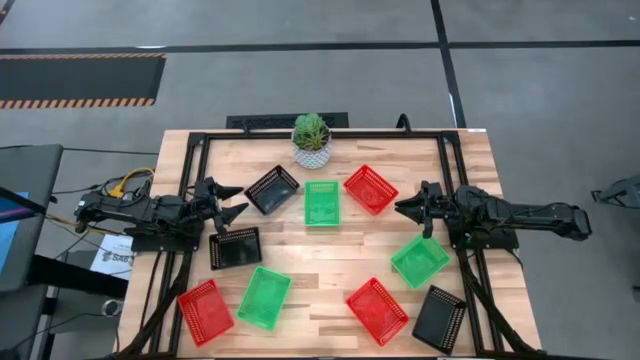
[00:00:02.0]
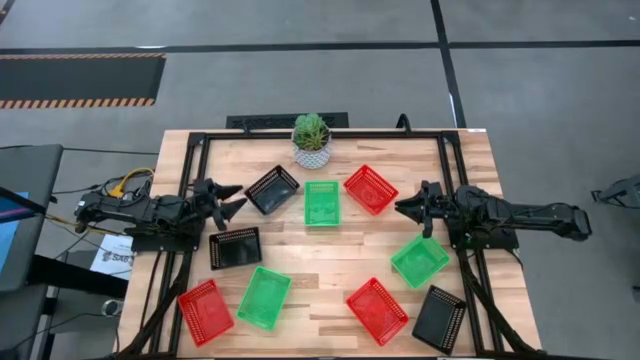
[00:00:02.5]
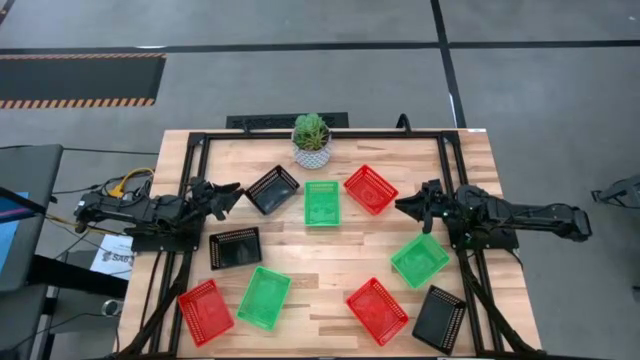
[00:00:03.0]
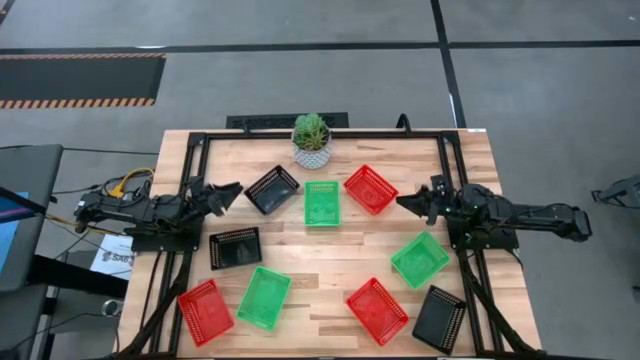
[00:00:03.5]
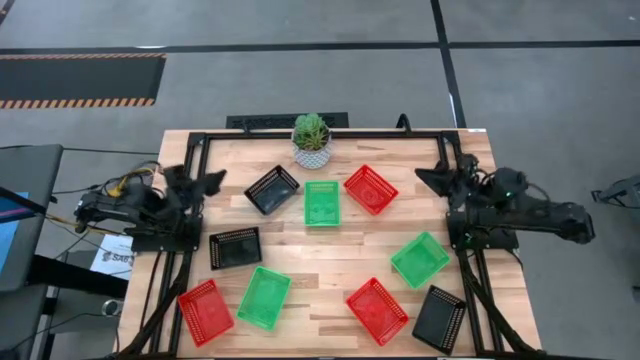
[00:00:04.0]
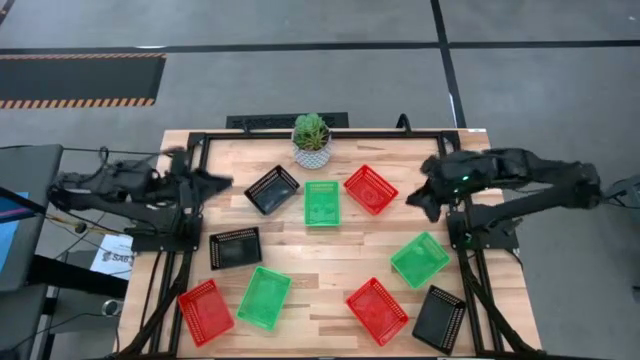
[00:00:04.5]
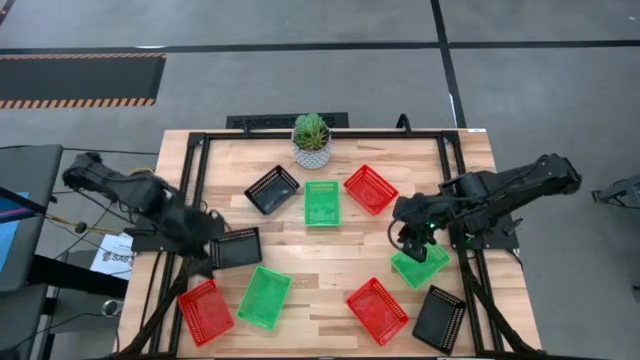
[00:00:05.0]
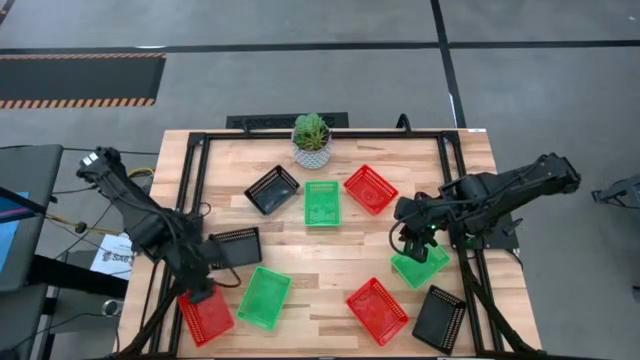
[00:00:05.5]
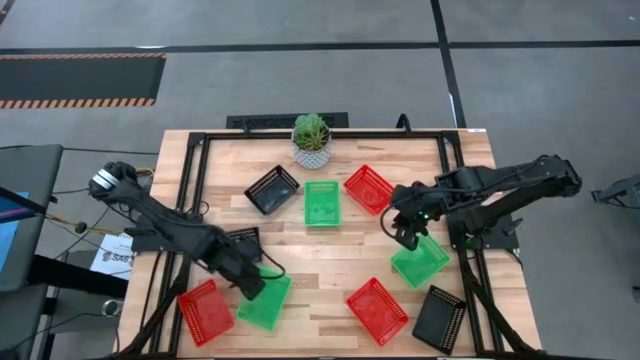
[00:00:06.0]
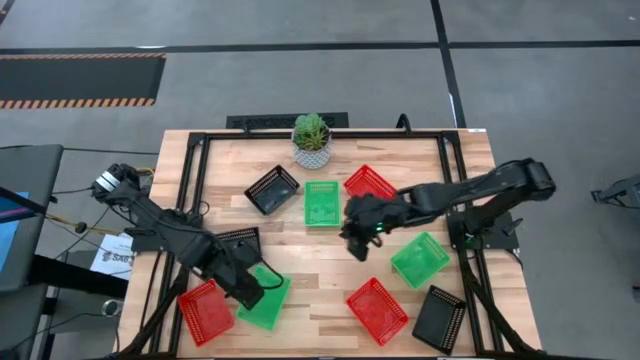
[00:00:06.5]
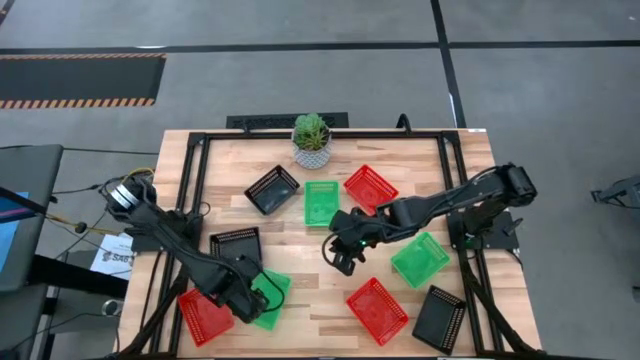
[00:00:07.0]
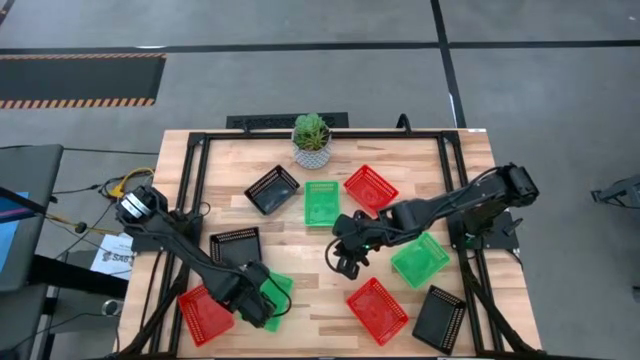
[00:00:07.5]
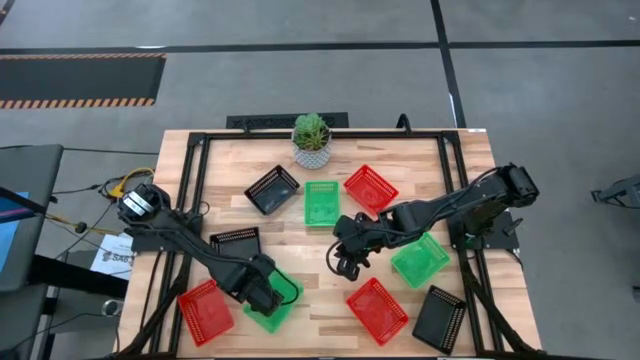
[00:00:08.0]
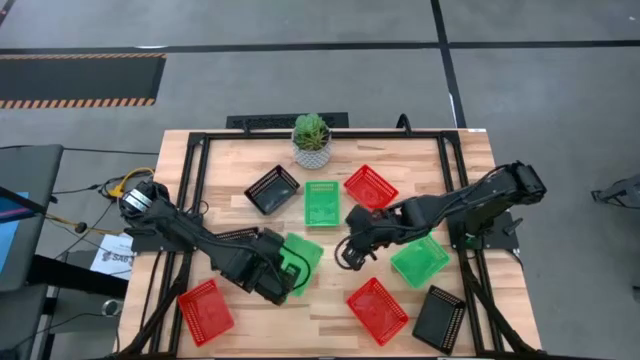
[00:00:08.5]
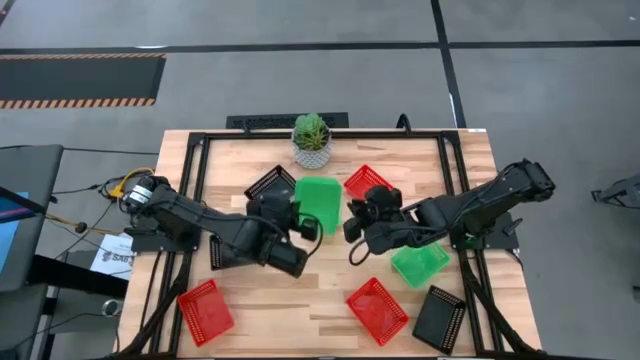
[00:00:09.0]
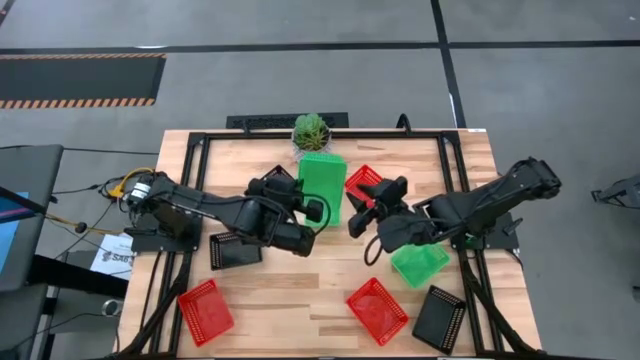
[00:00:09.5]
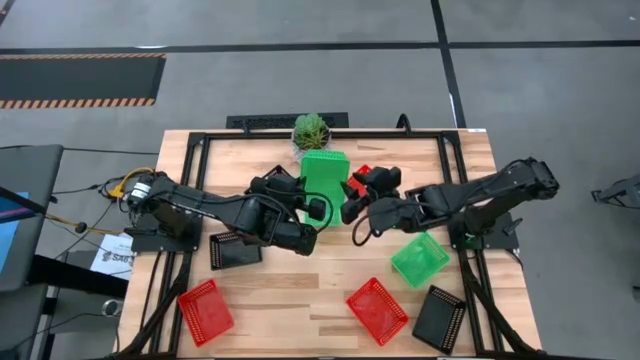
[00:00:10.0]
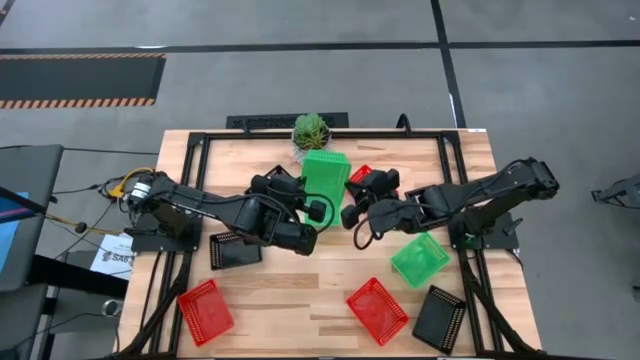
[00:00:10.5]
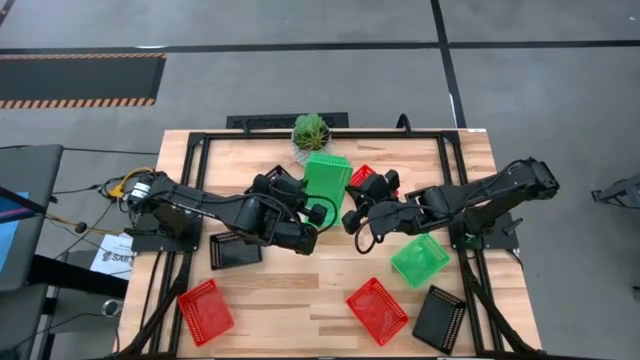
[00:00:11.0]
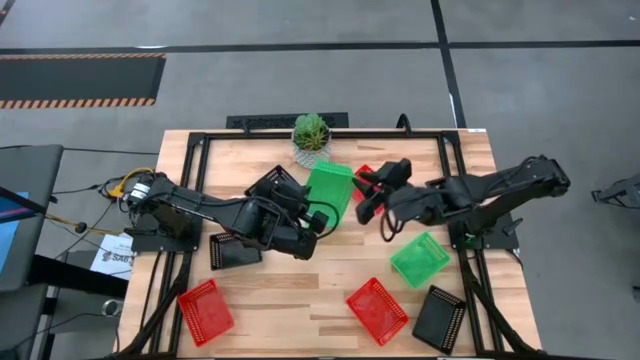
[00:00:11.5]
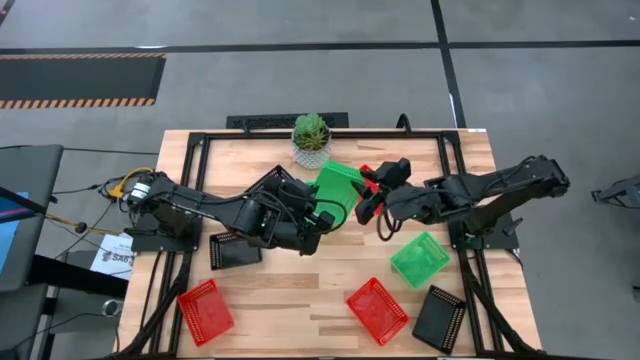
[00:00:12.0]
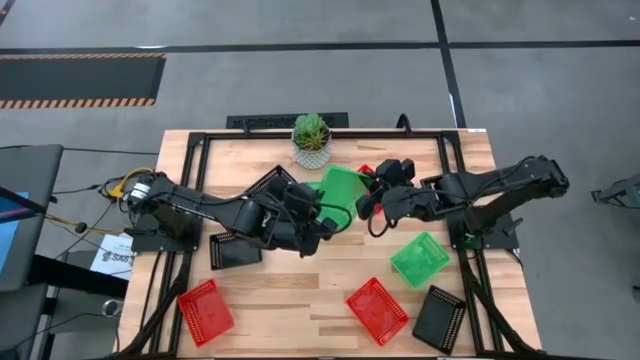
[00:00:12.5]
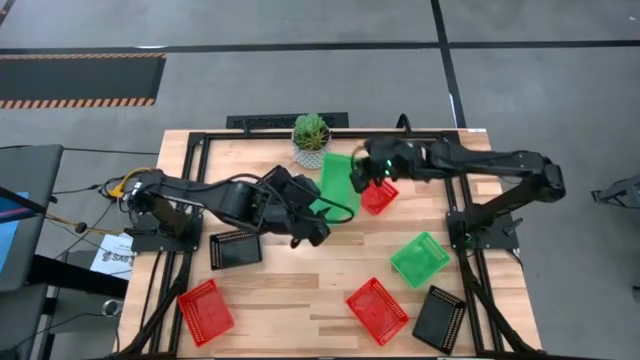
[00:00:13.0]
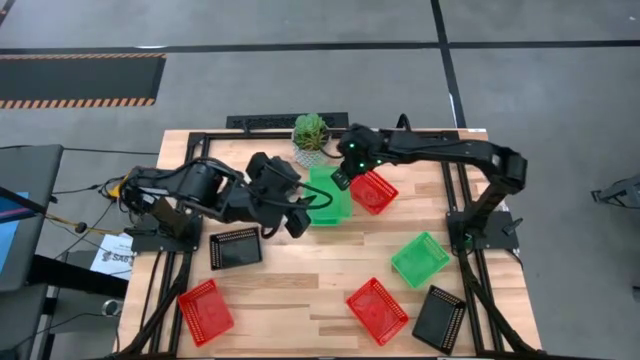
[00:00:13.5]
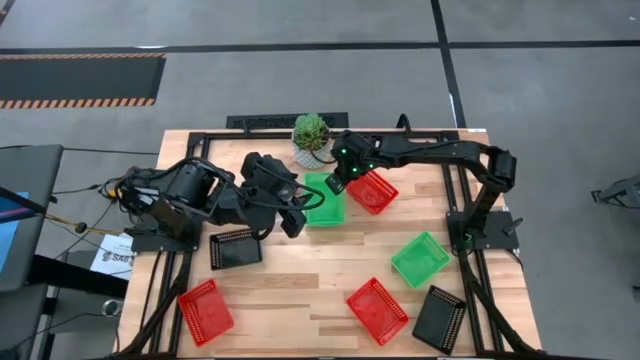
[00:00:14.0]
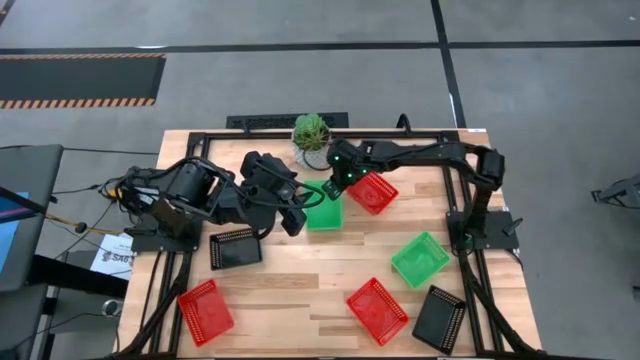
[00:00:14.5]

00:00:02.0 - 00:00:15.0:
Stack the left green bin on the middle green bin

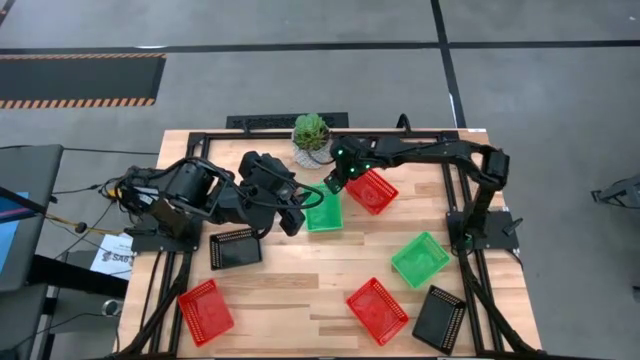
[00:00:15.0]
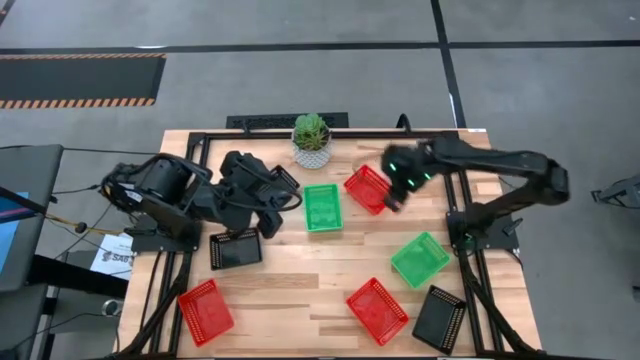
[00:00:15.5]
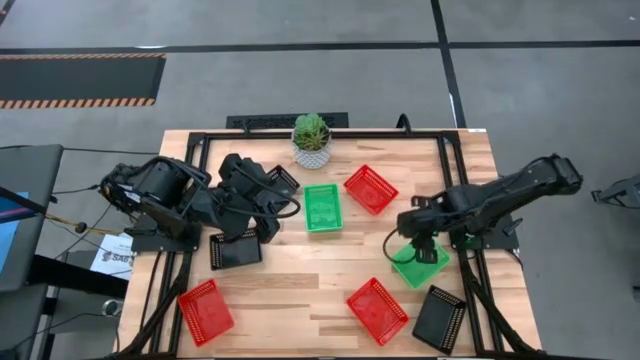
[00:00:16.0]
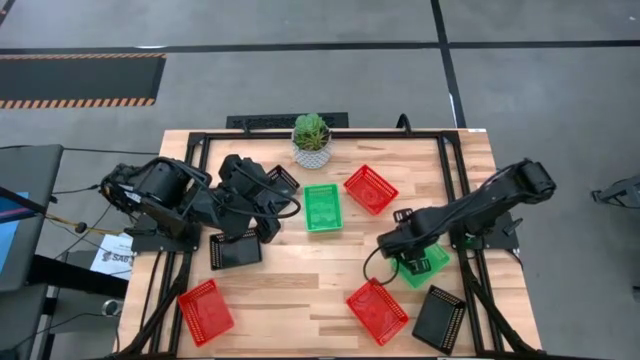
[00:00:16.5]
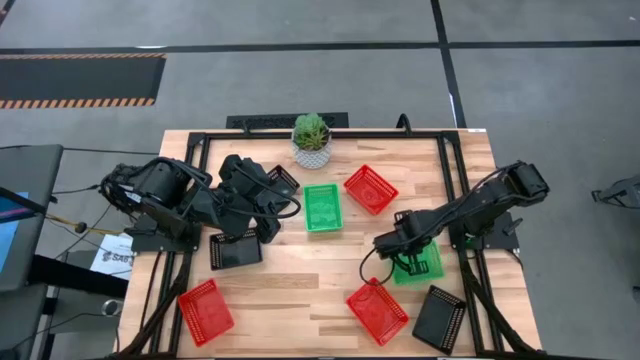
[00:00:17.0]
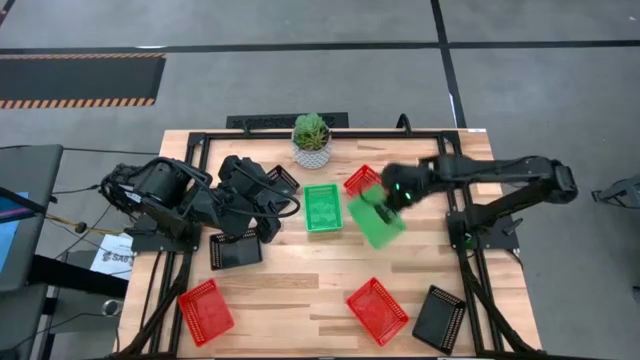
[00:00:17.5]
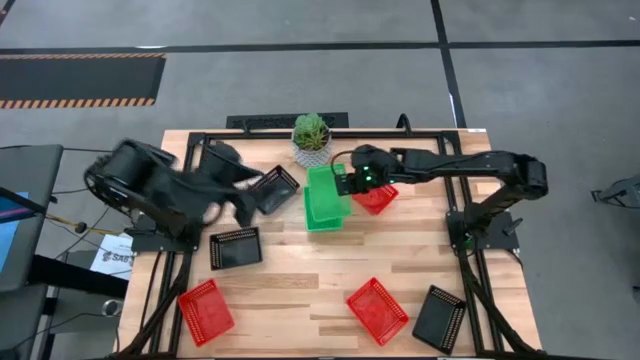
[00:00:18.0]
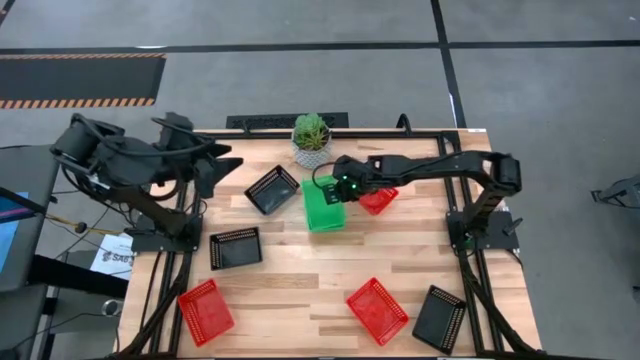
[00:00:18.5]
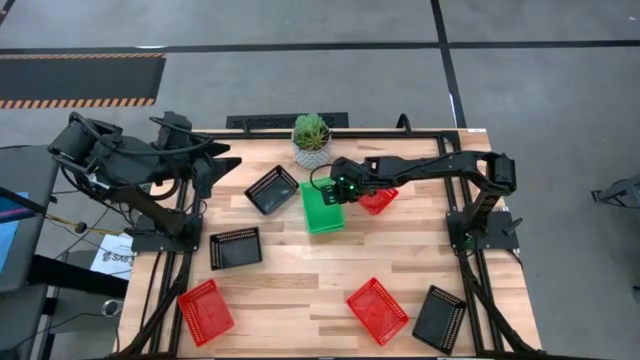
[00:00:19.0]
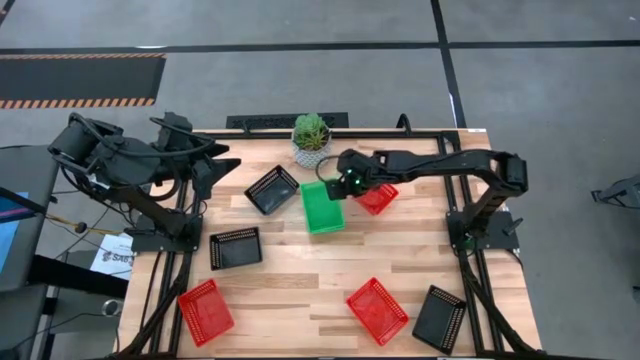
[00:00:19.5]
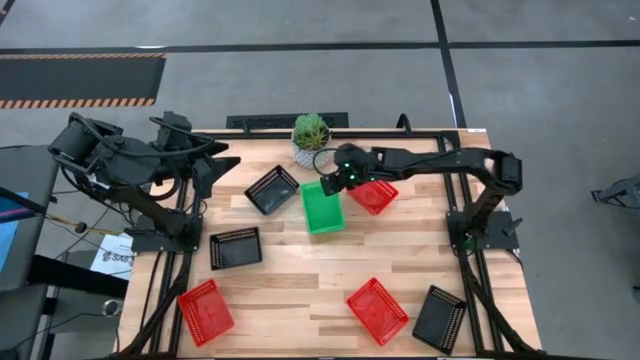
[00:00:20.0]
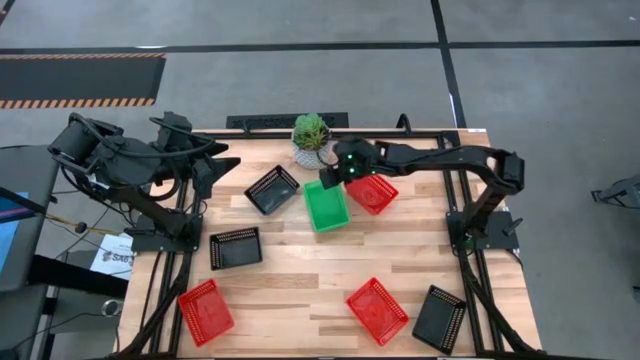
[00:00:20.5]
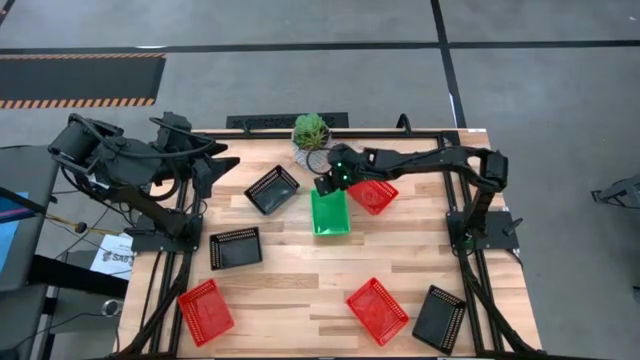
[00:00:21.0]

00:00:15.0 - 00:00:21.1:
Stack the right green bin on the left green bin
